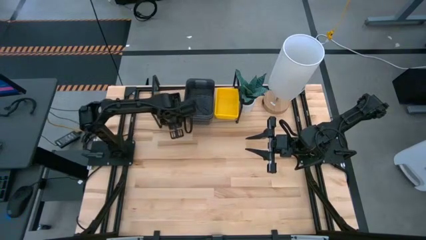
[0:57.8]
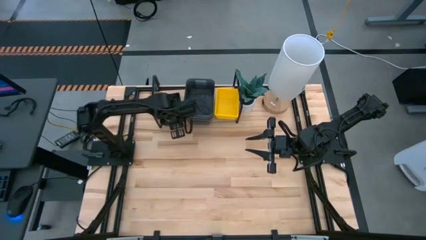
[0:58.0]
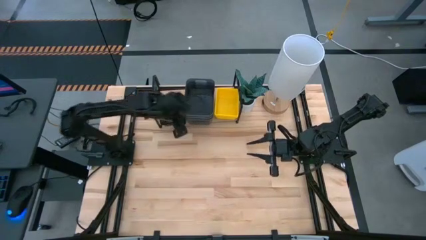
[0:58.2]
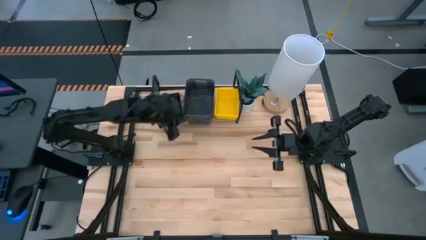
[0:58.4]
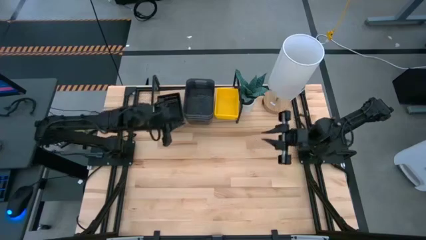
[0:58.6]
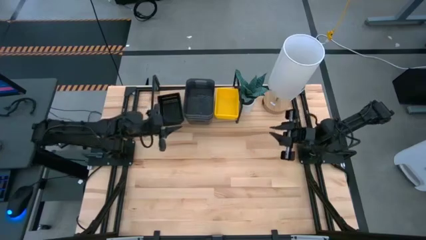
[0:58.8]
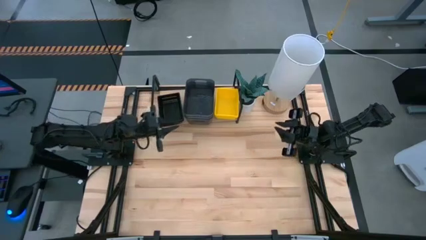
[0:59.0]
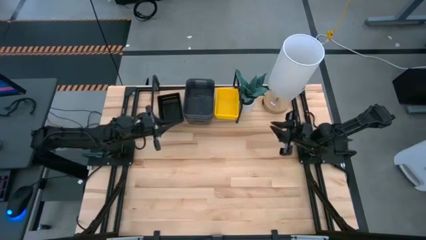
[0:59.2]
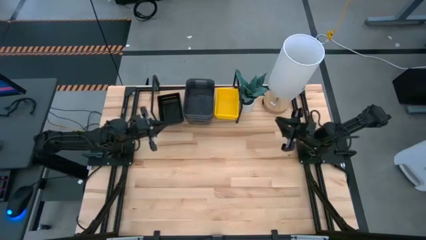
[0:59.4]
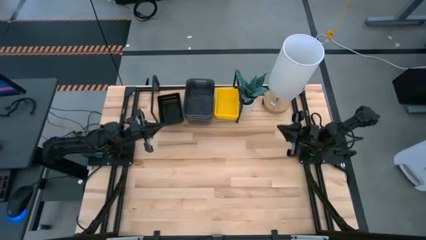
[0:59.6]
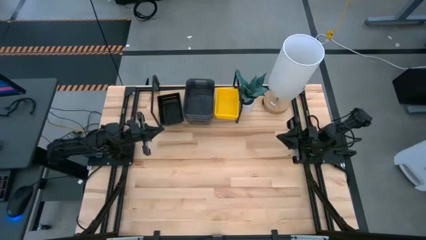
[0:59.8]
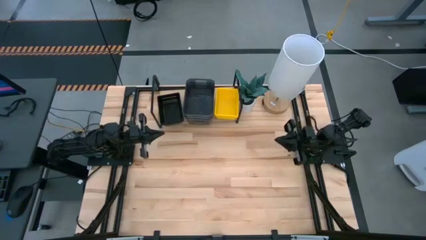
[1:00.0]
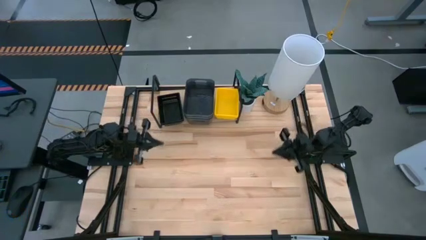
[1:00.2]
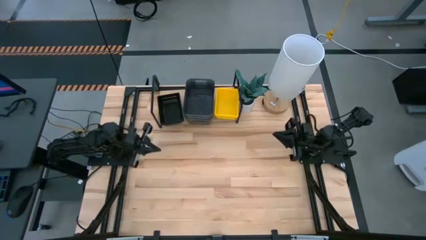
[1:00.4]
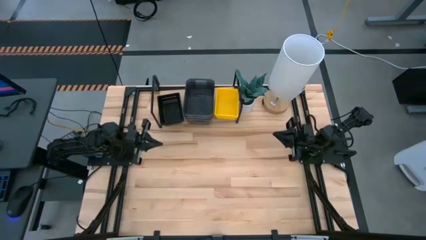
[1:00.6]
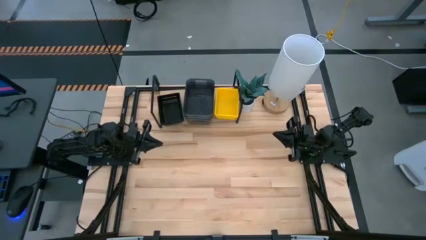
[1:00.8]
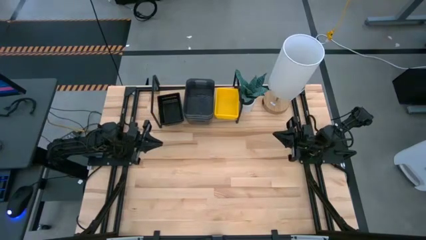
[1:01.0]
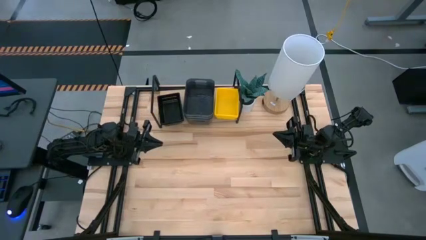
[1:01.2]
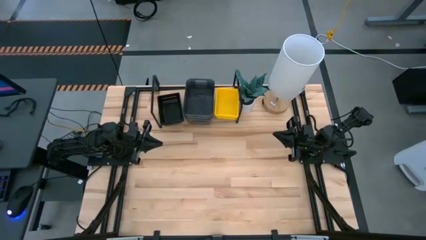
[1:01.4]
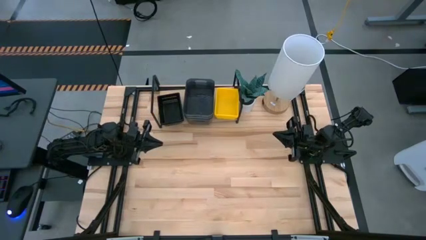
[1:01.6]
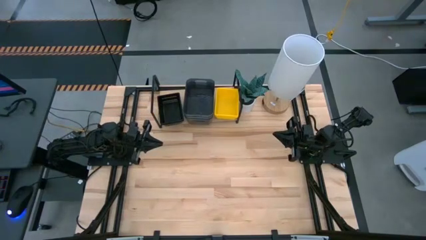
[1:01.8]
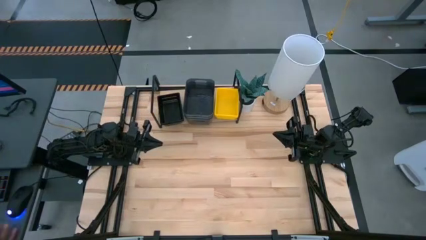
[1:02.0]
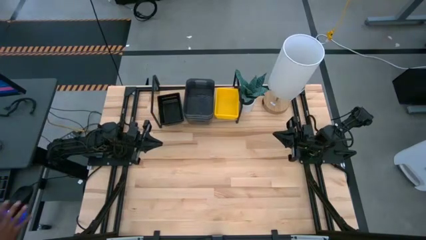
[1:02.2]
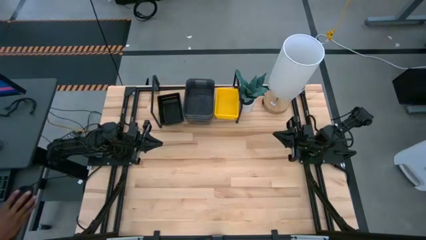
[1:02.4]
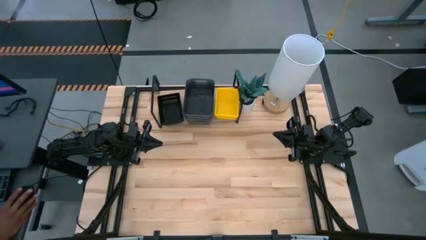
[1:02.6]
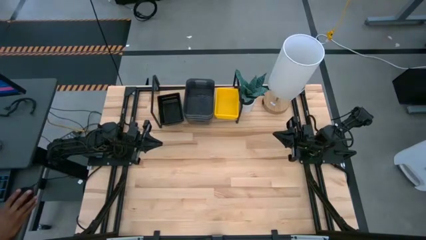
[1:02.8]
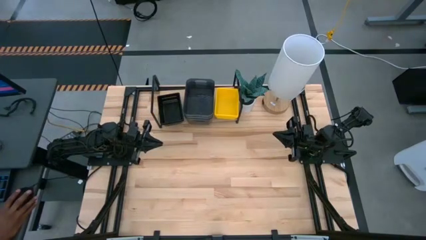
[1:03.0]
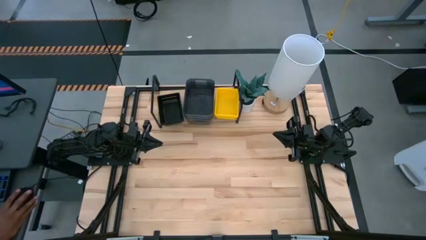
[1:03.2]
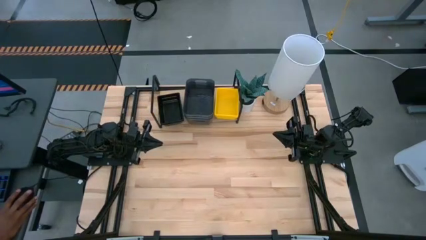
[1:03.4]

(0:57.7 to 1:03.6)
Task: Stack baskets on shelf by color
Return to Home Position

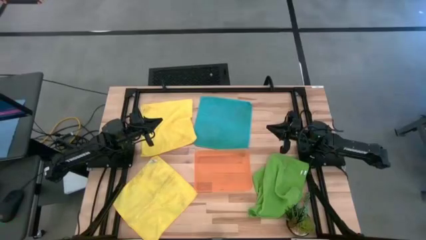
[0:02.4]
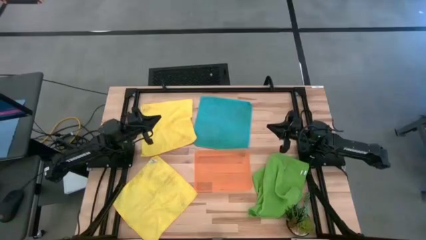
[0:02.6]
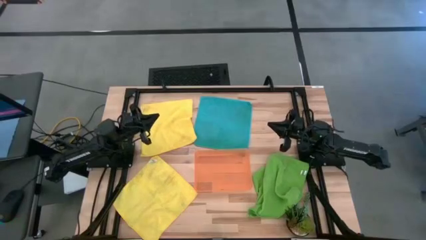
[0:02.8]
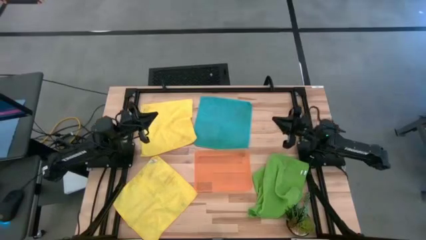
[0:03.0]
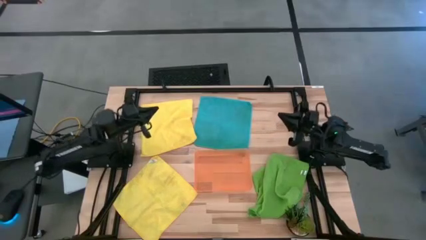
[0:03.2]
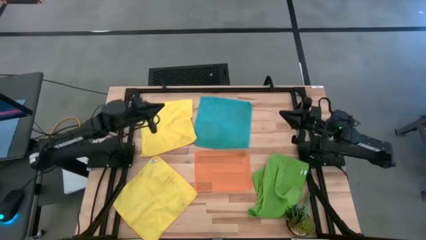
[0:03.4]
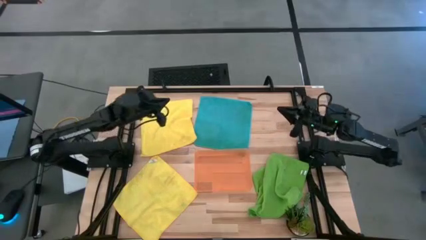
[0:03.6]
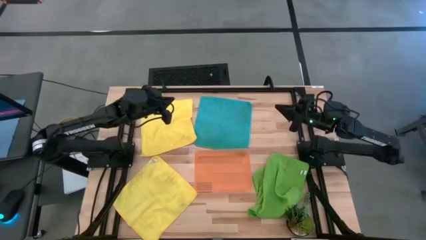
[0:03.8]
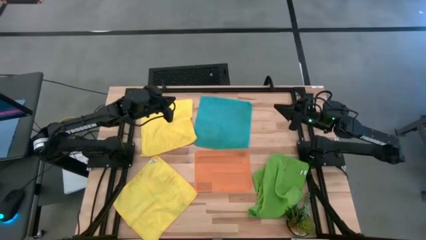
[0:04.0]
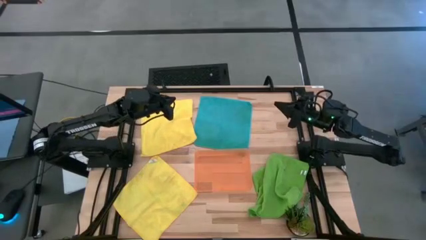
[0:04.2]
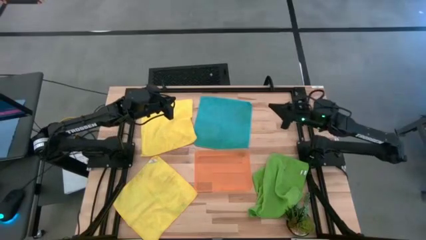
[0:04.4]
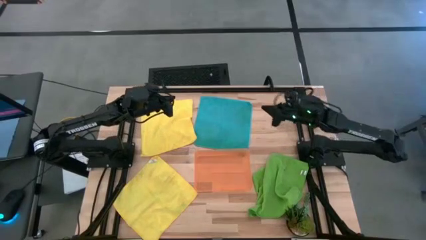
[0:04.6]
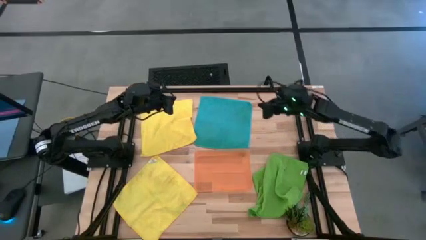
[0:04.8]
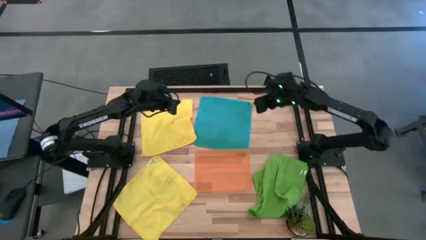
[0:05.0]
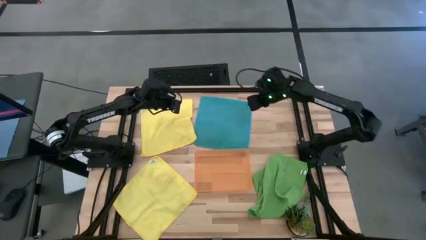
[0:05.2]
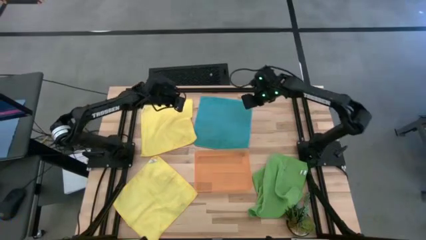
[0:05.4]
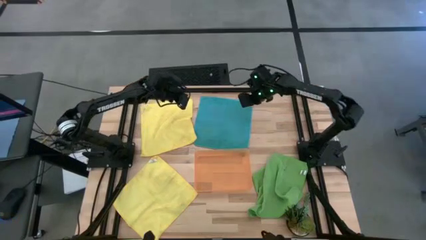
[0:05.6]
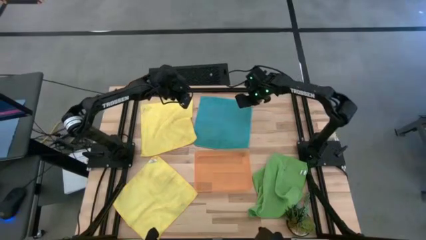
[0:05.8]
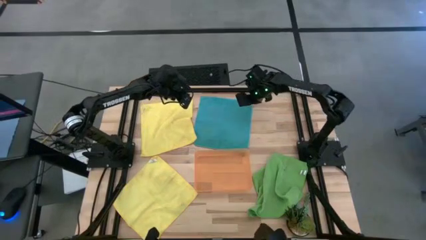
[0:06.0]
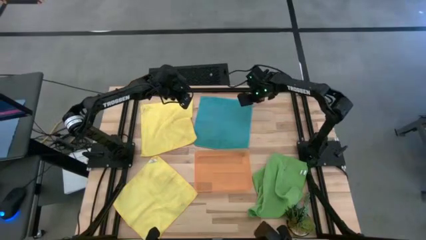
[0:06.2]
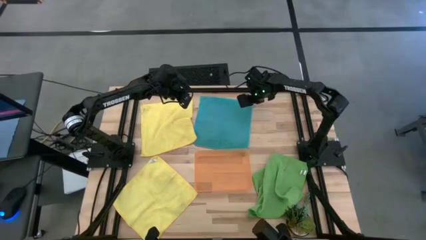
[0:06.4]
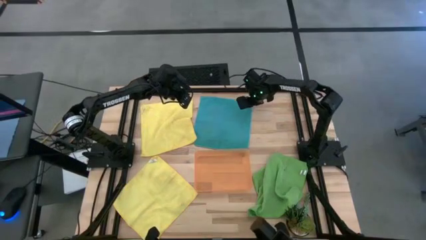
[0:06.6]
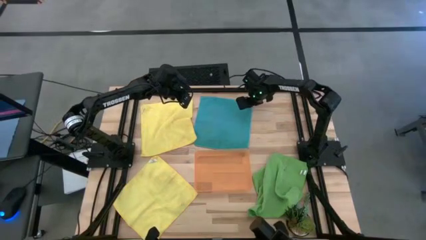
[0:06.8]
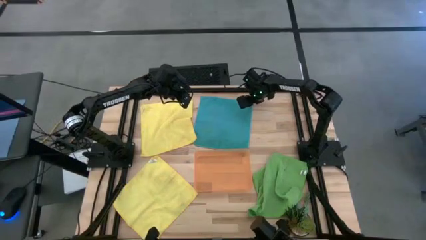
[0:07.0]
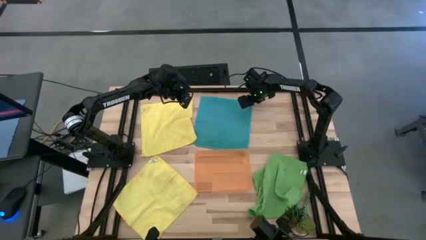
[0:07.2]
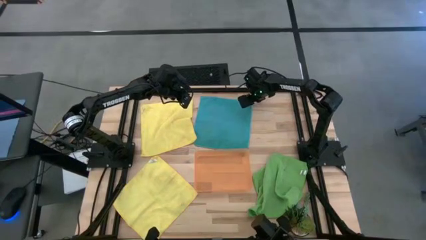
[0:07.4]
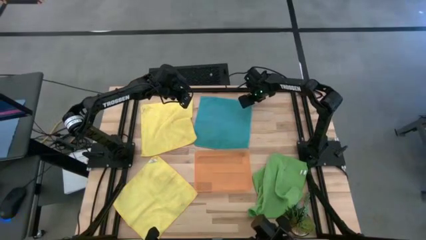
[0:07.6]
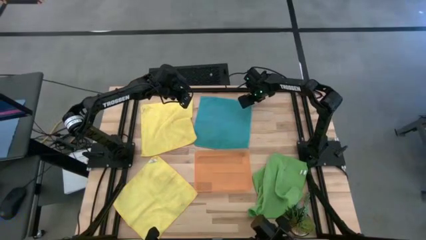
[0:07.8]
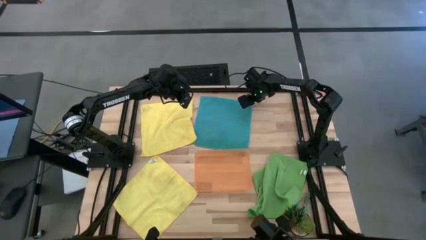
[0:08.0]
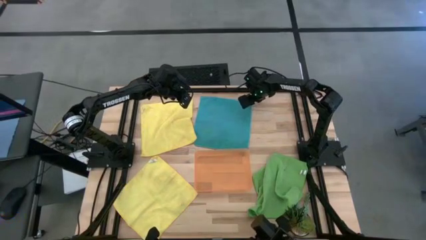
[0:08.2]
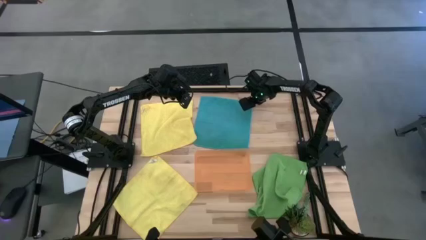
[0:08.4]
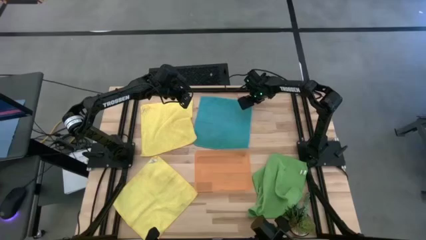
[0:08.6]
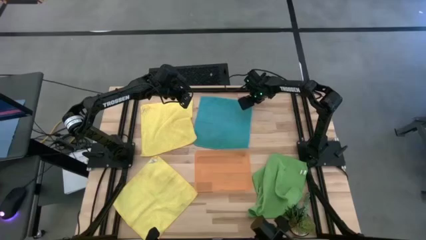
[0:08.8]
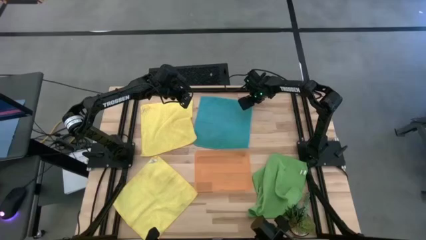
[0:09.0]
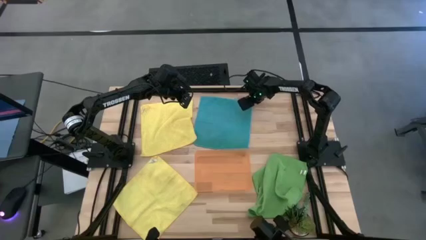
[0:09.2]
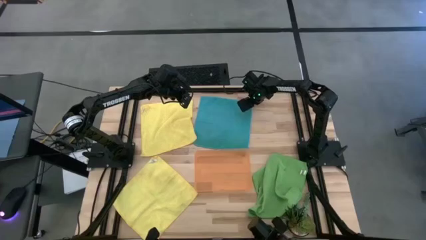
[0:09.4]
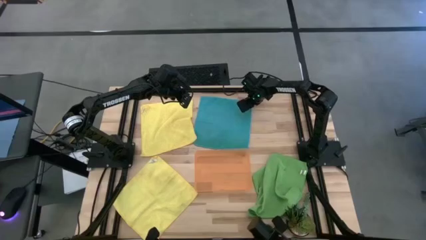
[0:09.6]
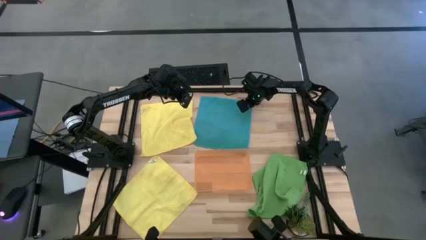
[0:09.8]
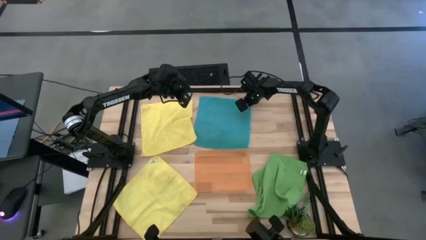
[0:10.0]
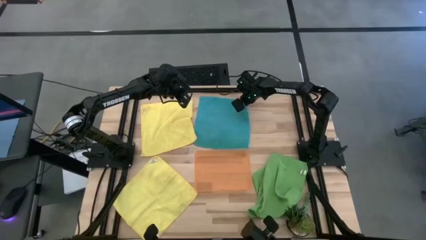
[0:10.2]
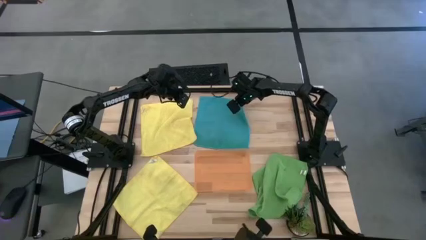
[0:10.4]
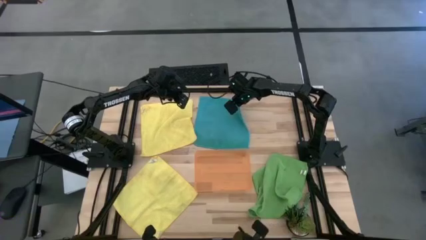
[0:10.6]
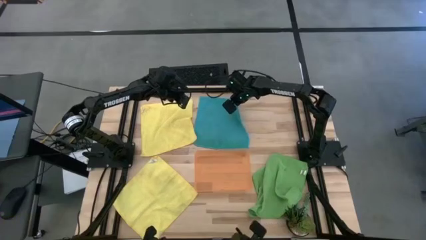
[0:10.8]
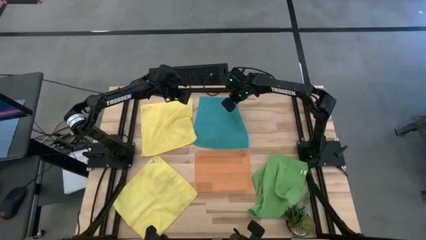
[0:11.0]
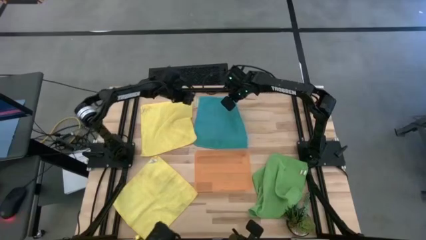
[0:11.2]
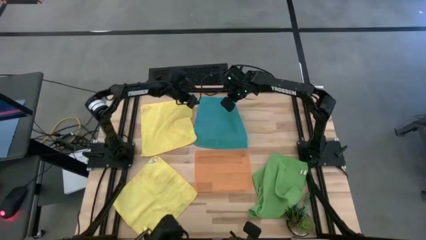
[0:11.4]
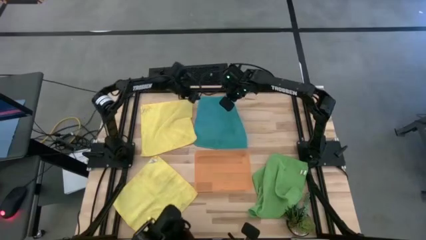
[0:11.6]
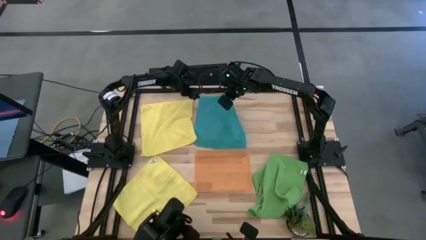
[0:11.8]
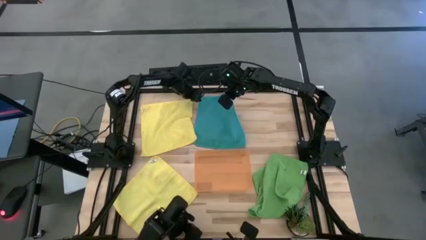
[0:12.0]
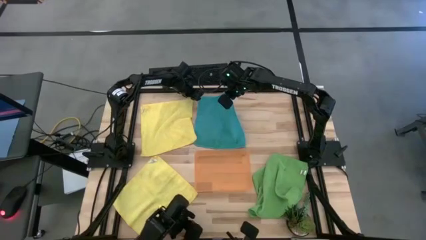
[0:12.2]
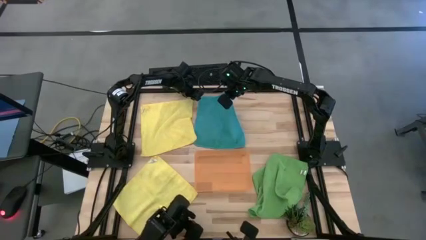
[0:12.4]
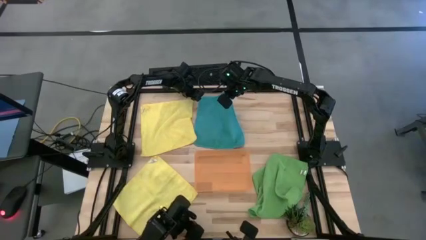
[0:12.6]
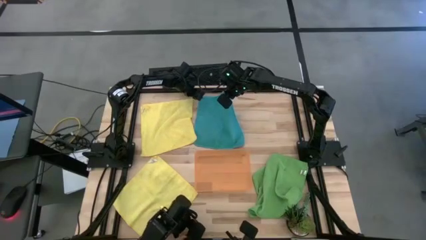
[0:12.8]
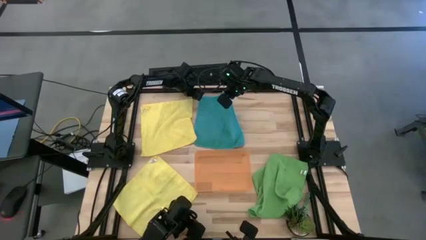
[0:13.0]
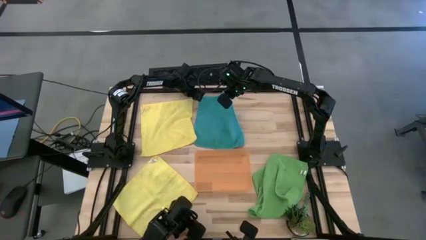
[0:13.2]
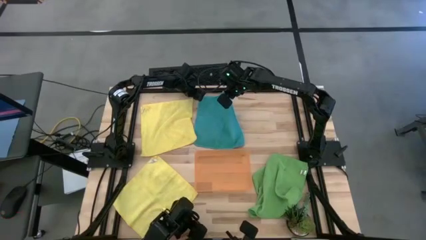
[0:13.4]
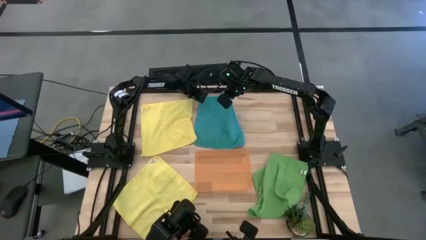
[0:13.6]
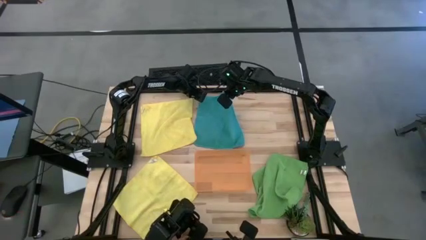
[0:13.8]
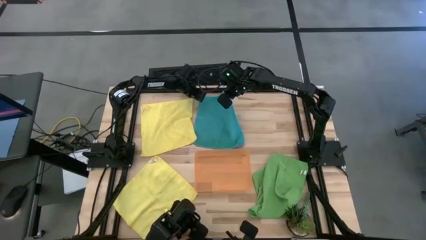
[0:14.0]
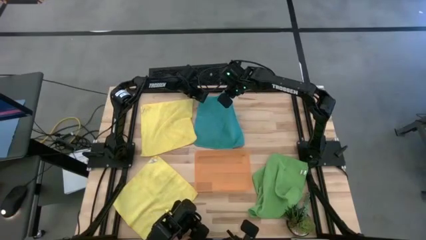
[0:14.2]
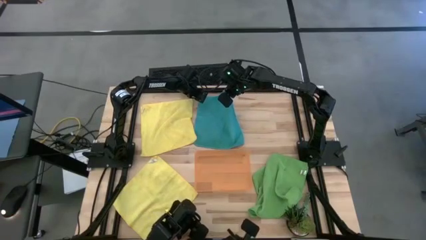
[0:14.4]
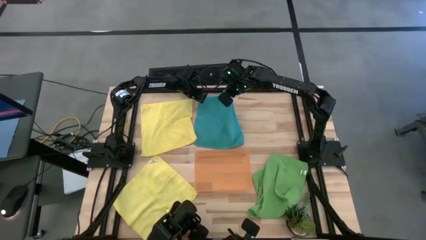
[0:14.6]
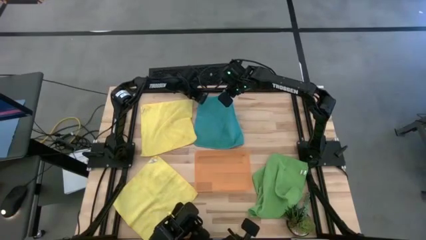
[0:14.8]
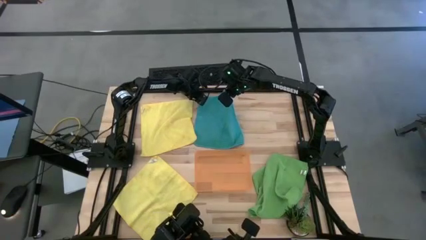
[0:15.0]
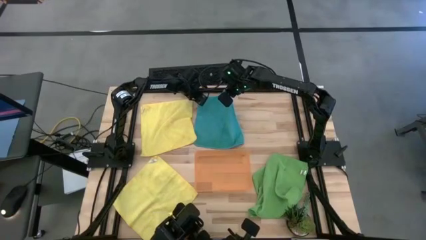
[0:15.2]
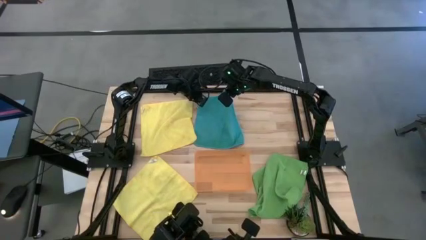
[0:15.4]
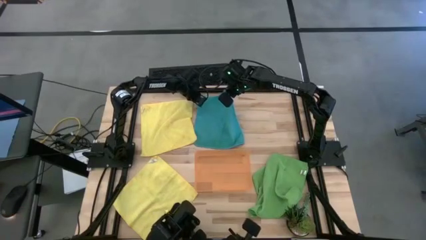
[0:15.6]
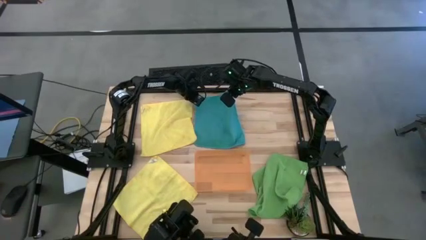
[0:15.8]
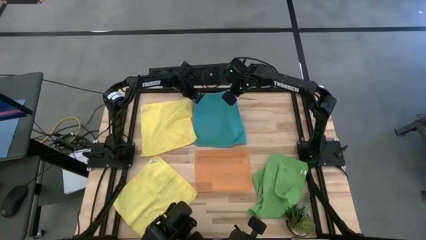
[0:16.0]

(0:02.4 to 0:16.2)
Task: Fold microfiber towels
Fold the blue towel
